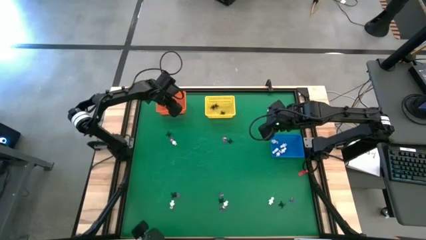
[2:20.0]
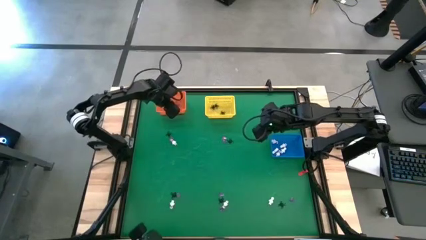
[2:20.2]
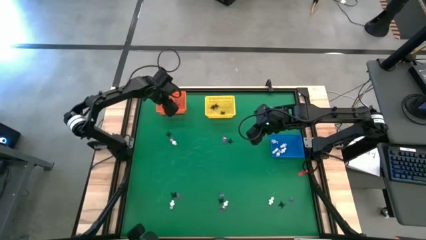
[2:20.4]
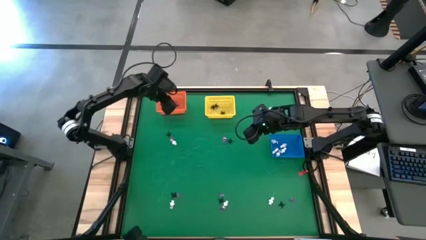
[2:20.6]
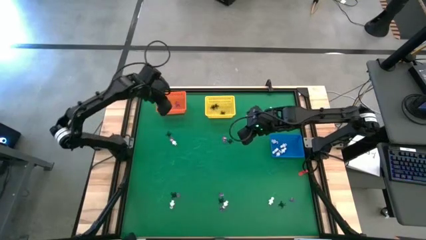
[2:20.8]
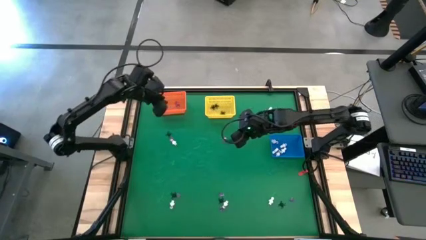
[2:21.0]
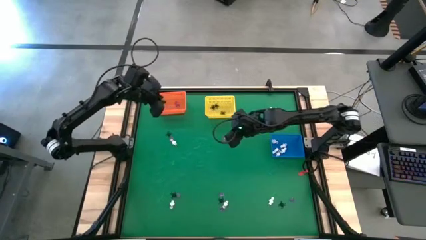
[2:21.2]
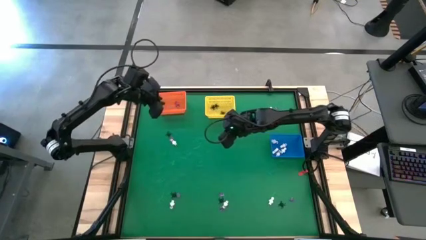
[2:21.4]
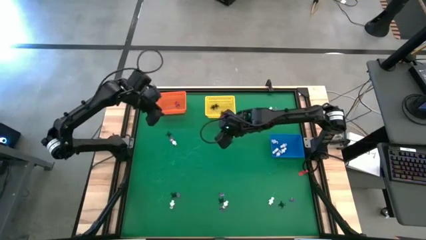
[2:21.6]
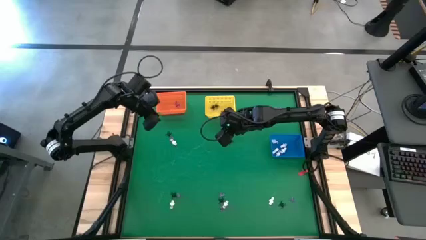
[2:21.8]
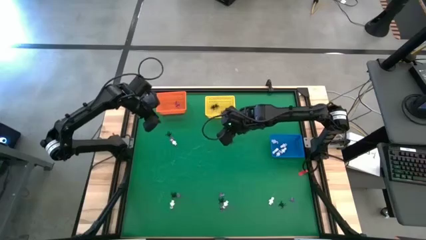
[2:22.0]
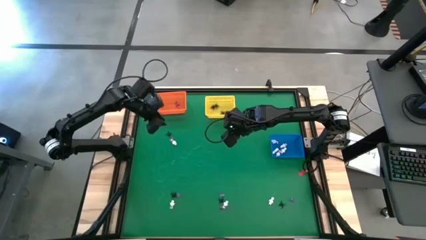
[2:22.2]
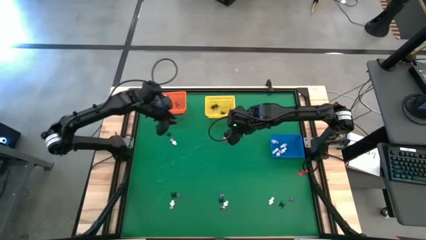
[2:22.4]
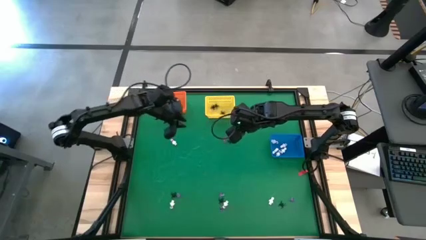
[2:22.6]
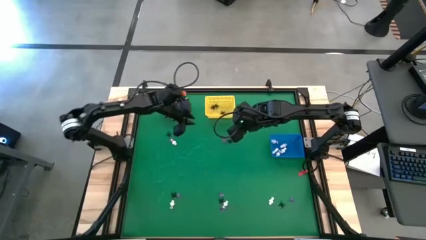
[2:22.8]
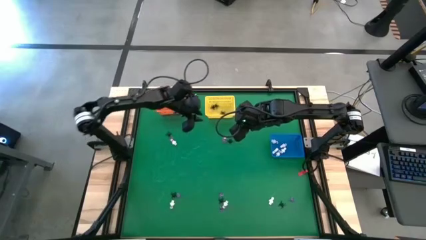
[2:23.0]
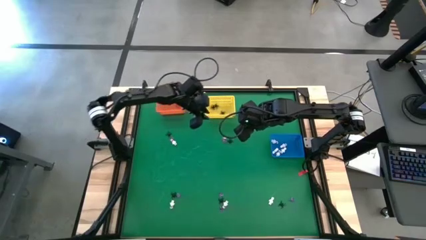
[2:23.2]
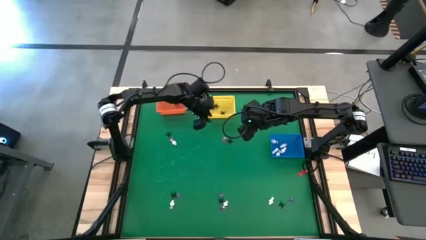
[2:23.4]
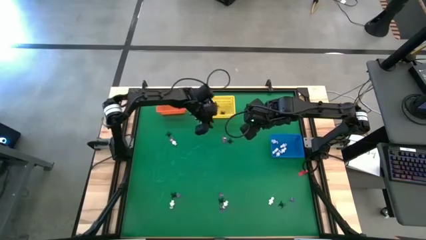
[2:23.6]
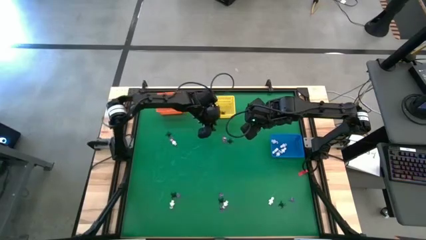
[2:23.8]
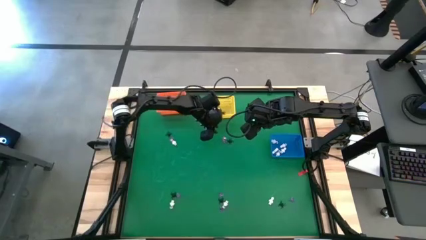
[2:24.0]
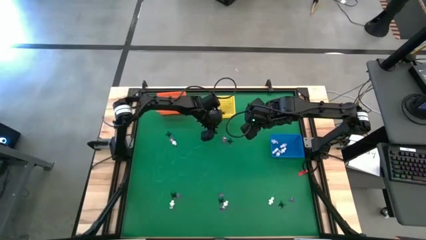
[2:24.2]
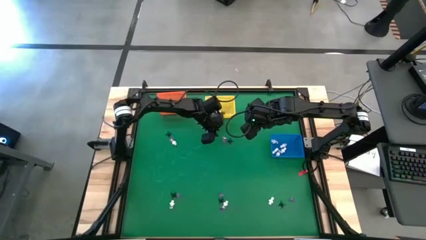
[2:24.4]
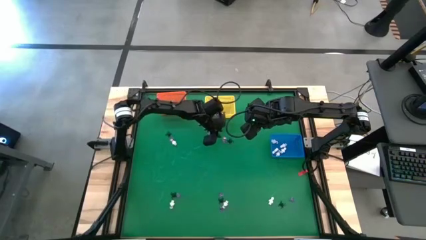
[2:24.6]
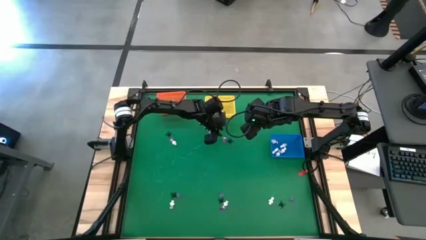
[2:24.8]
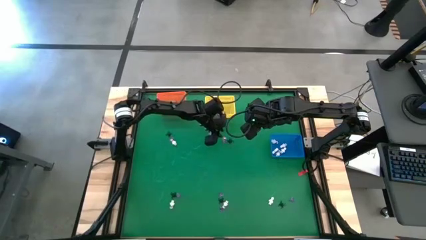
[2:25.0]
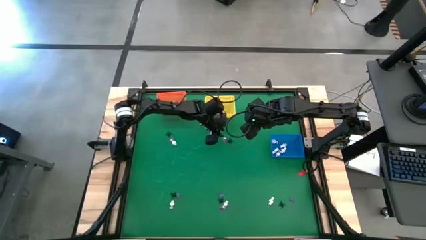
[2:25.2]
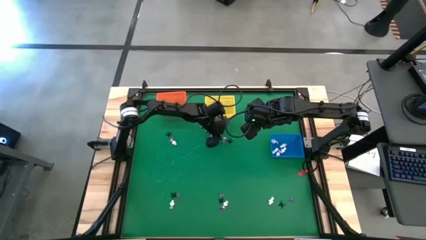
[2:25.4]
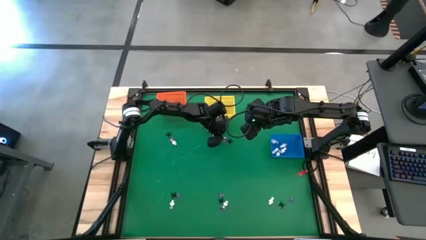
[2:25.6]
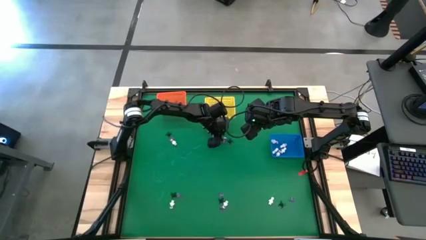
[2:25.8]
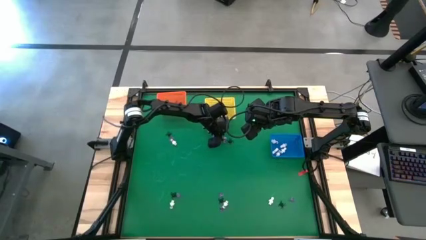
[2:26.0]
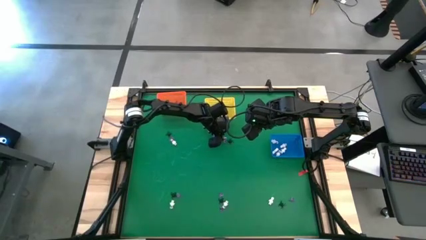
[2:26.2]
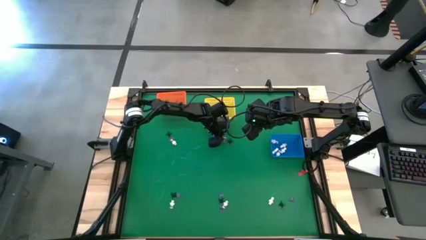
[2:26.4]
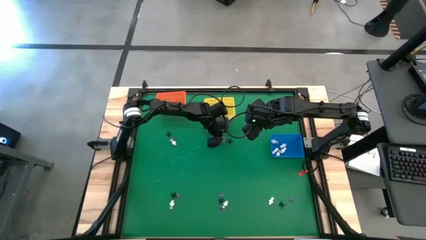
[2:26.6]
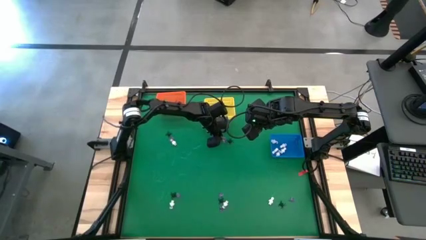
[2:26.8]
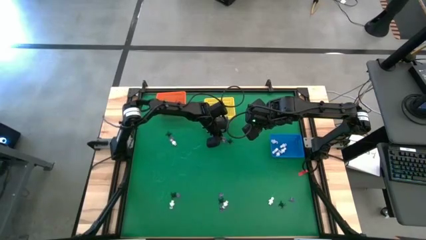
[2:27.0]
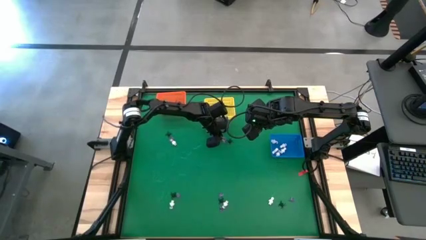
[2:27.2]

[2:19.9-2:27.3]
Task: Sort Halloween decoration
Put the violet hat toy into the orange basket

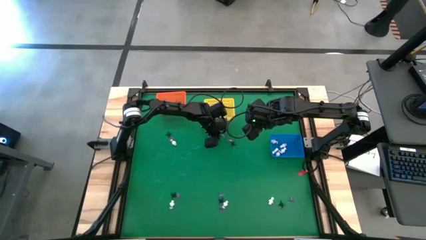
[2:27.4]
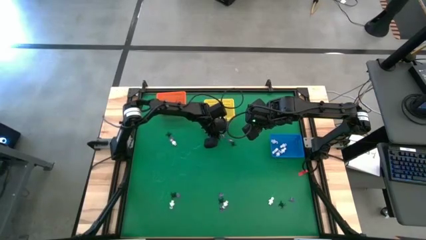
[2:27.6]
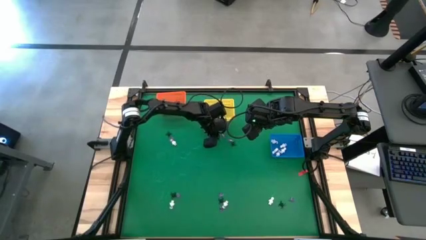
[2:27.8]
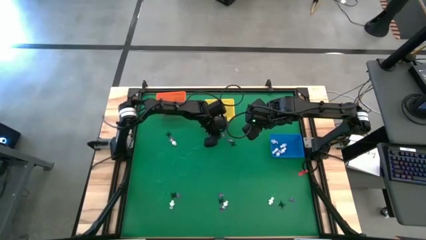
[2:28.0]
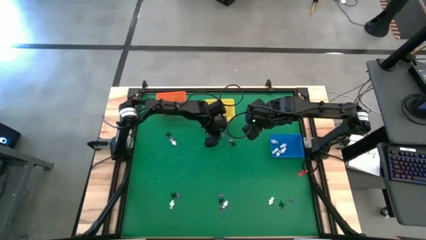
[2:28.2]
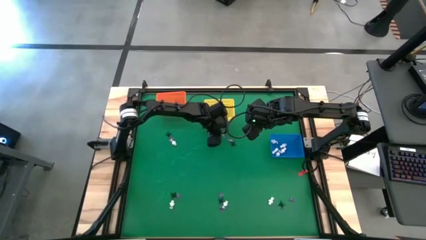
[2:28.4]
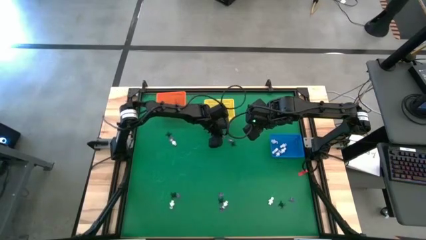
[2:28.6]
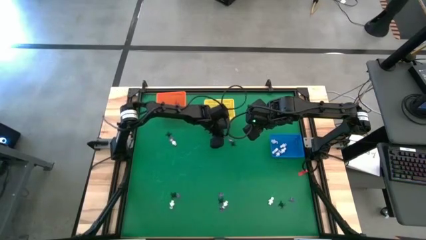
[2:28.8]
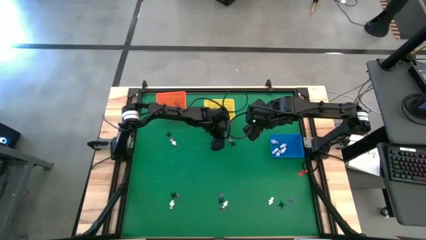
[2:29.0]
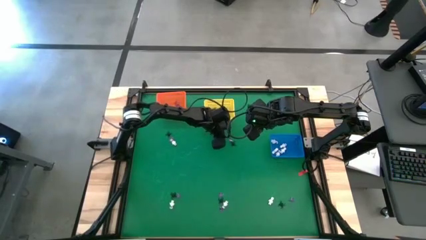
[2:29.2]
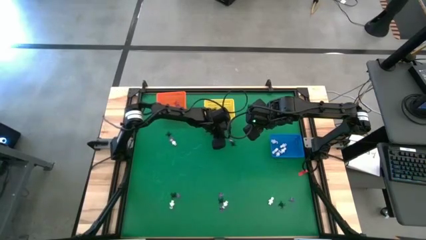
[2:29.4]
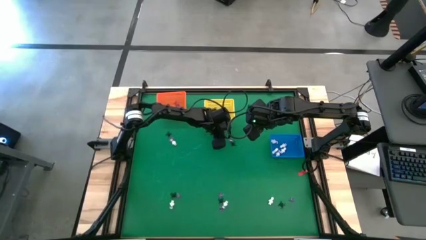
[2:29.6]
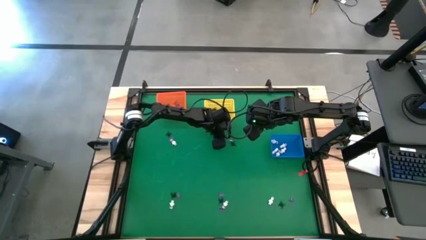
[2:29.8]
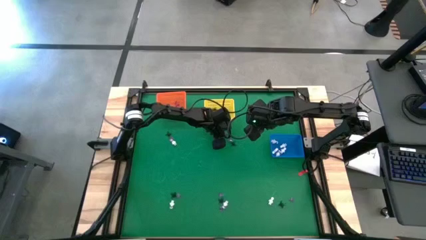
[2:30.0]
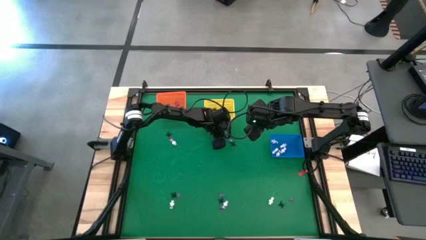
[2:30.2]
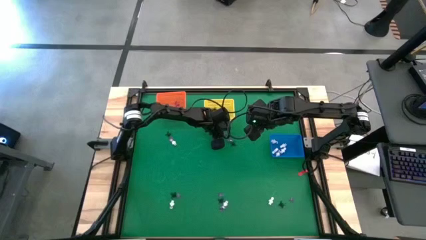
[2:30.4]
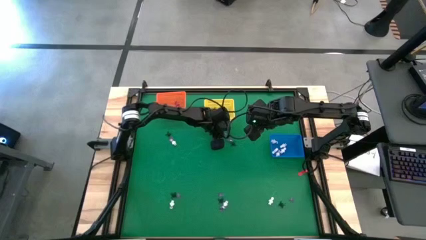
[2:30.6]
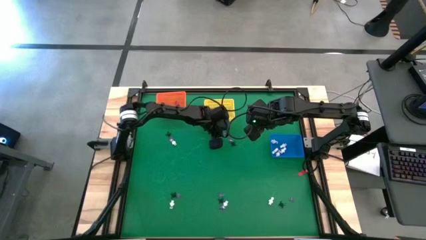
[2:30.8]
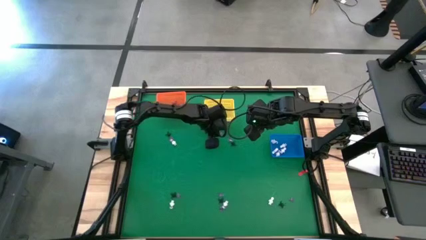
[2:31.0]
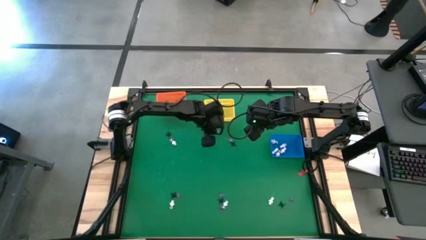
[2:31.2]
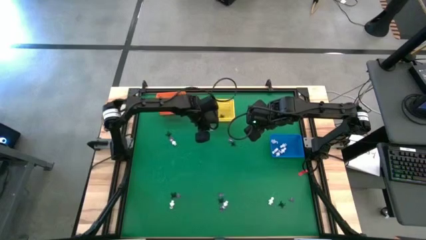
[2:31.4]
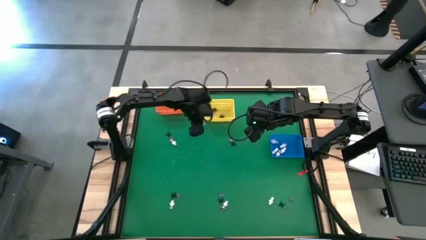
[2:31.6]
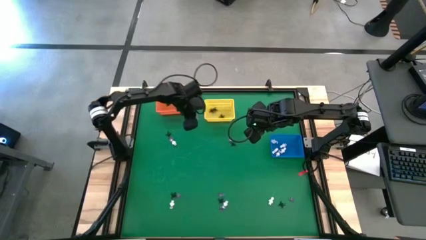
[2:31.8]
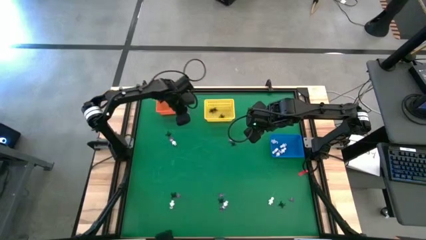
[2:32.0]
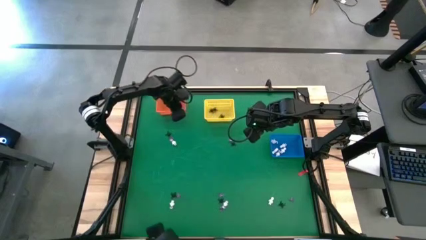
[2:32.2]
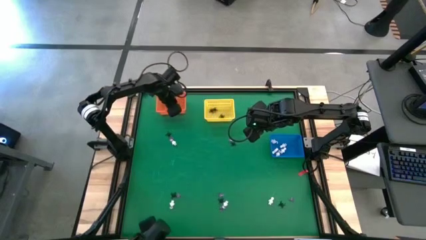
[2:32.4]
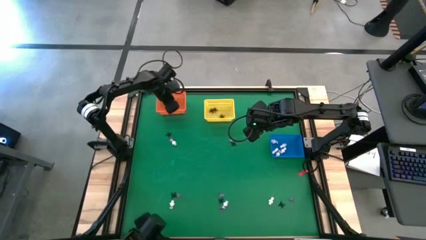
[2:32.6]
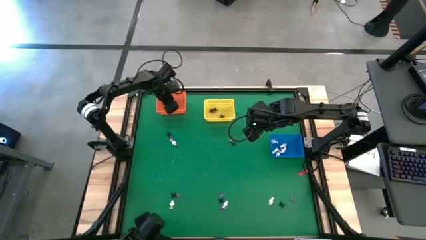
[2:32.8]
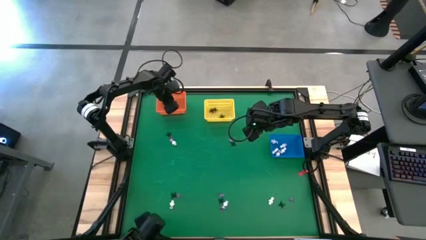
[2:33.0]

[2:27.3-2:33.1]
Put the violet hat toy into the orange basket

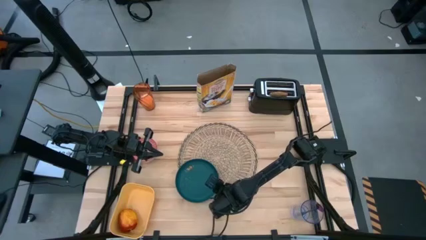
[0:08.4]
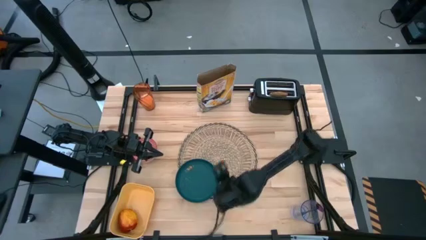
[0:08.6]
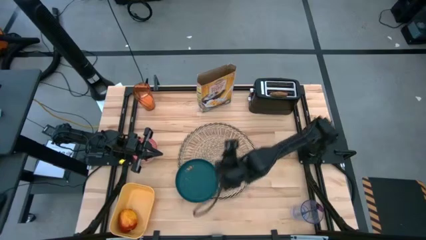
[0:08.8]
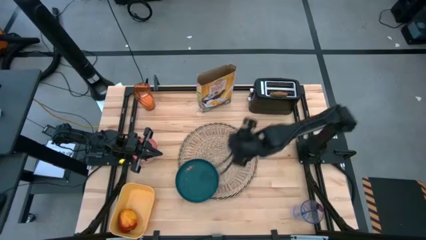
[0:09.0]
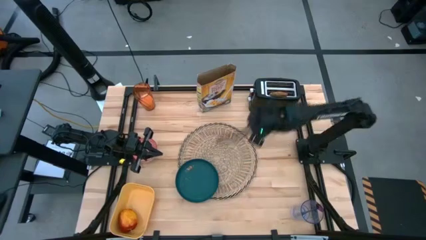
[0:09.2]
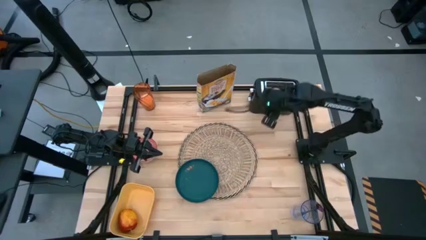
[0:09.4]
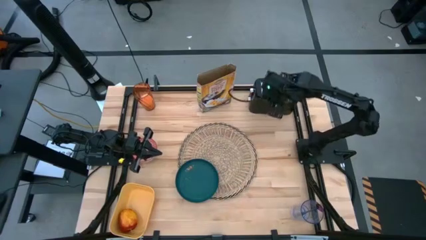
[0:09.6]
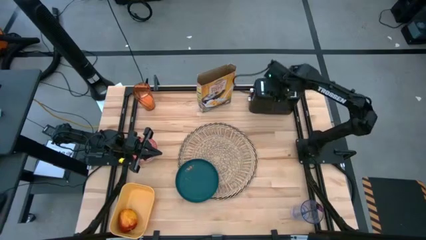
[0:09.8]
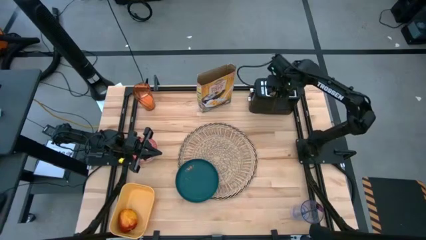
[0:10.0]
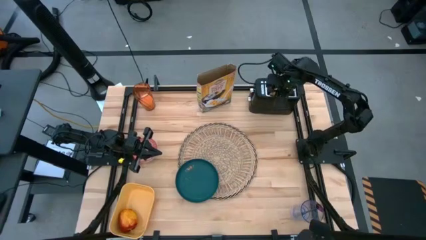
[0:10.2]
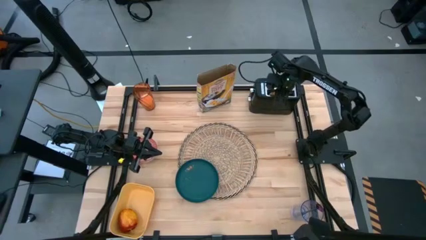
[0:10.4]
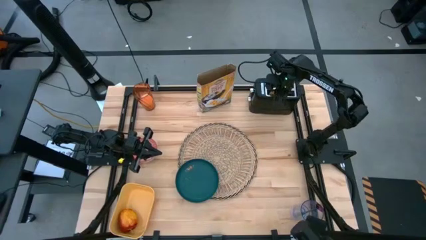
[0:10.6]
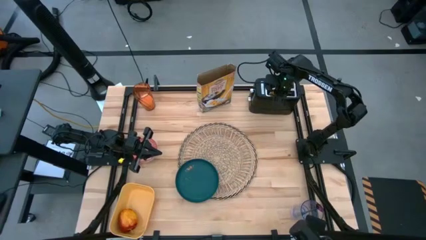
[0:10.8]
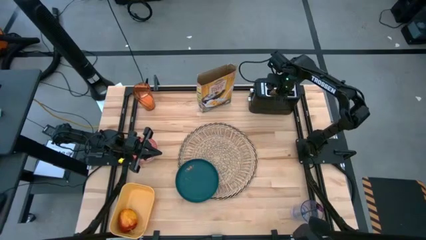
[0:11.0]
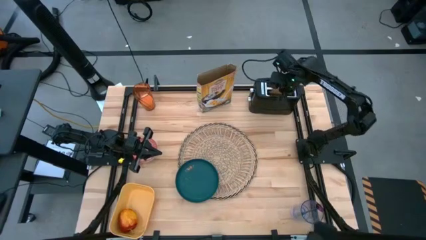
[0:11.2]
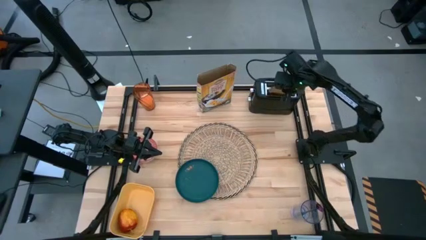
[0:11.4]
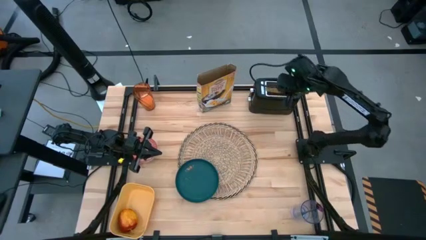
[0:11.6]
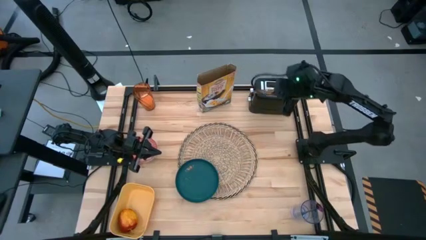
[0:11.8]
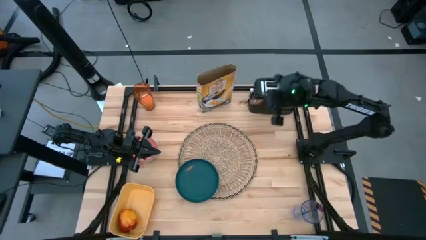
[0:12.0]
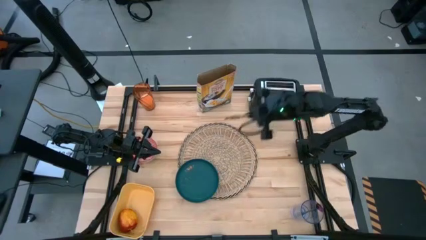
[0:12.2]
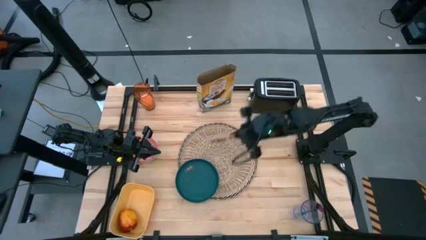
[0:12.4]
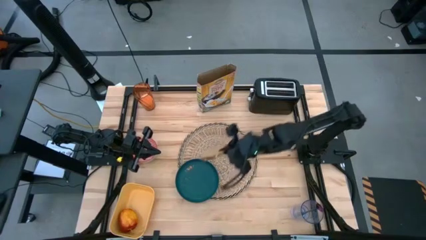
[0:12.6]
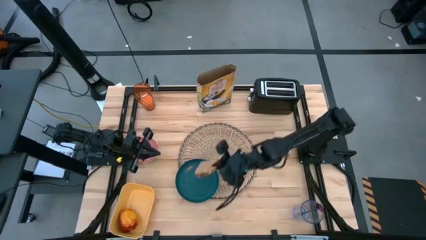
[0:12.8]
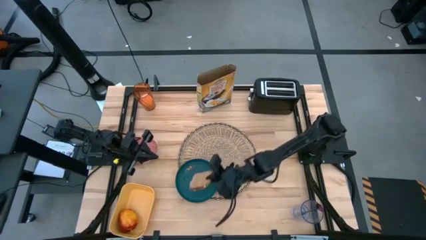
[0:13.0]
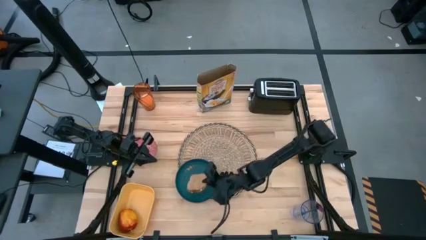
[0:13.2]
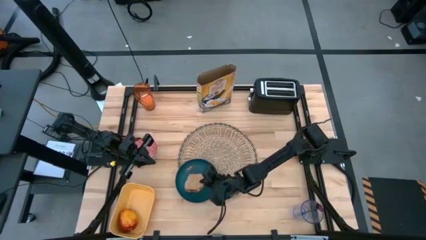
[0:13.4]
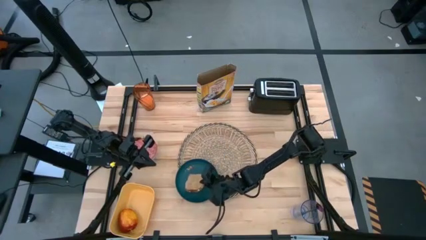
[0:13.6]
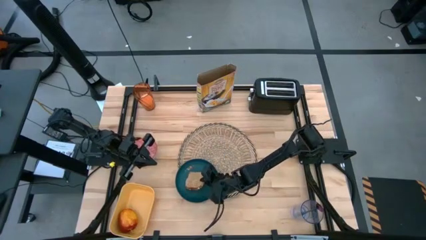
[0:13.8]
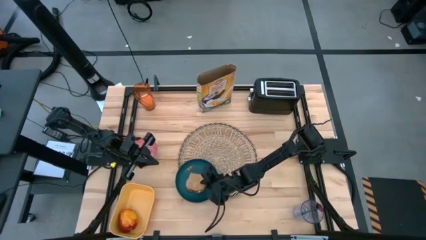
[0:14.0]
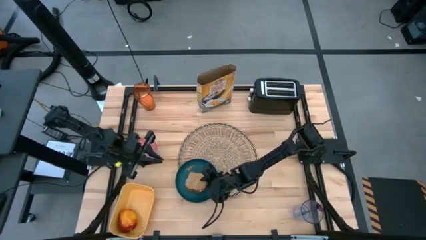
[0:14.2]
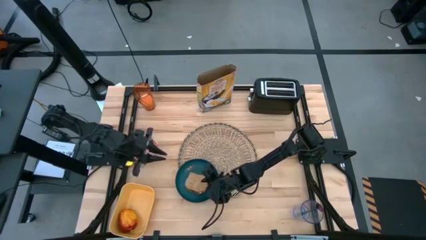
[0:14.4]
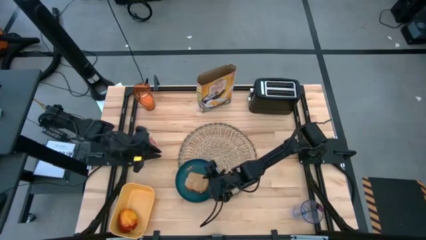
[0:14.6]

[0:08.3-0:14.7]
Task: Arrange a breakfast setting
Put the toasted bread on the green plate
